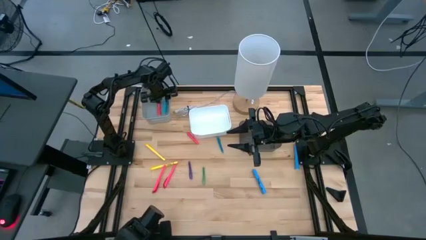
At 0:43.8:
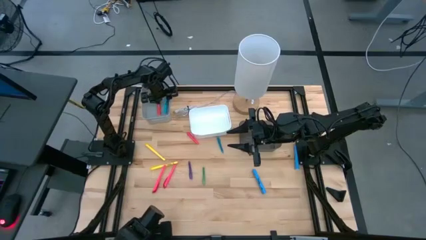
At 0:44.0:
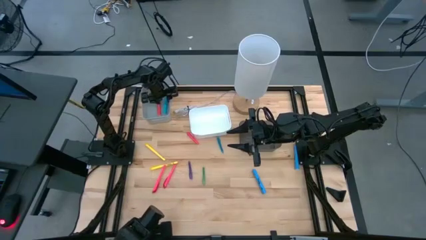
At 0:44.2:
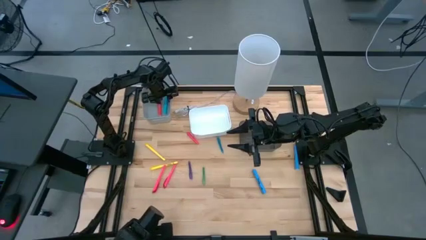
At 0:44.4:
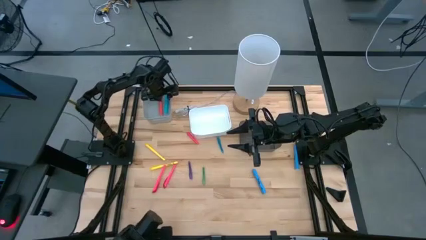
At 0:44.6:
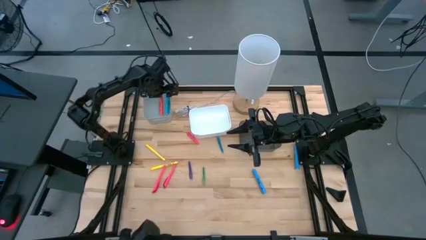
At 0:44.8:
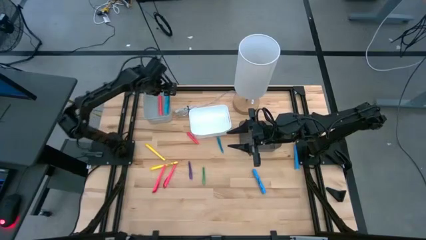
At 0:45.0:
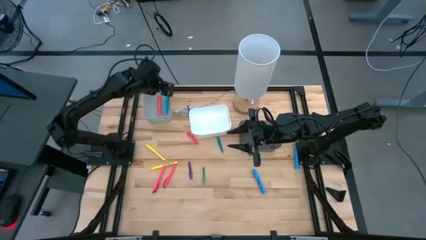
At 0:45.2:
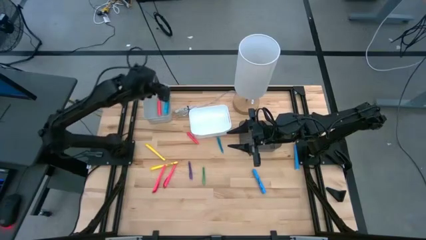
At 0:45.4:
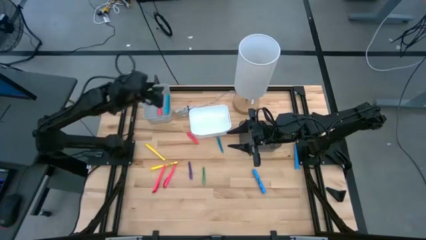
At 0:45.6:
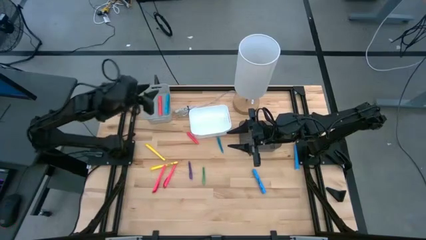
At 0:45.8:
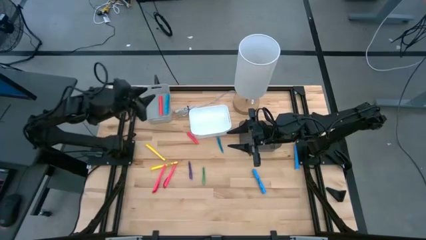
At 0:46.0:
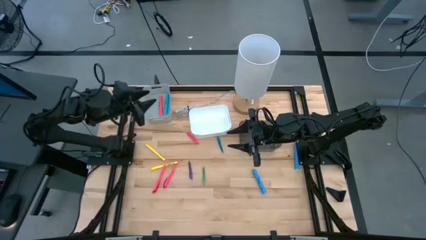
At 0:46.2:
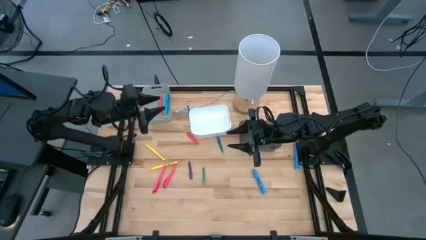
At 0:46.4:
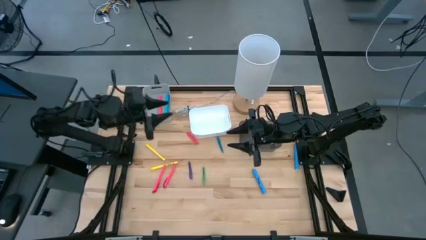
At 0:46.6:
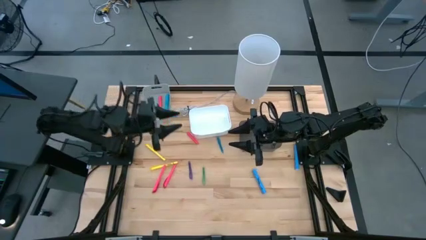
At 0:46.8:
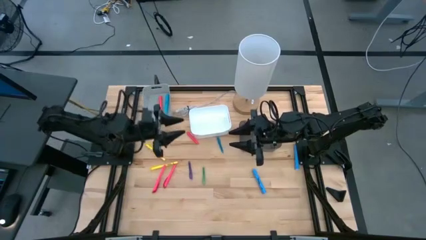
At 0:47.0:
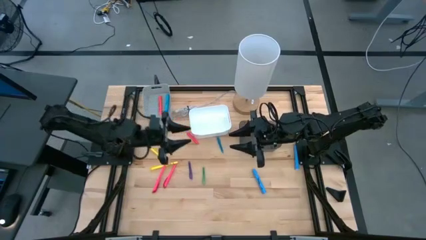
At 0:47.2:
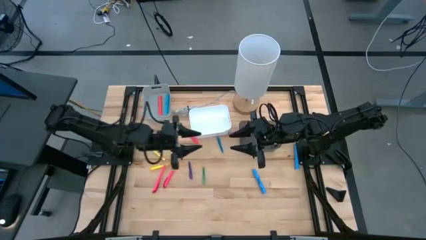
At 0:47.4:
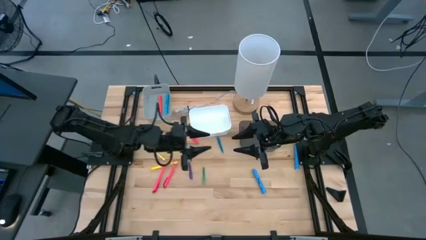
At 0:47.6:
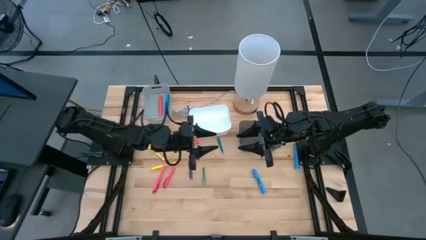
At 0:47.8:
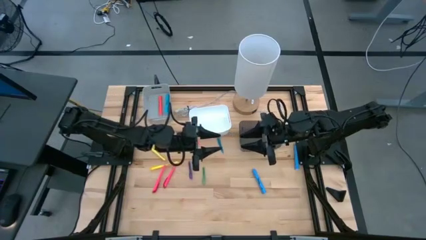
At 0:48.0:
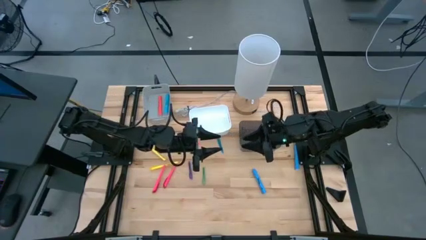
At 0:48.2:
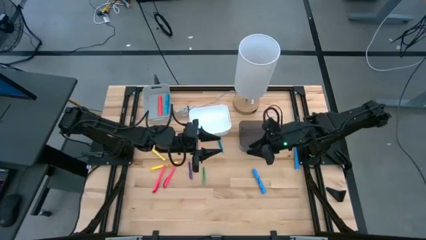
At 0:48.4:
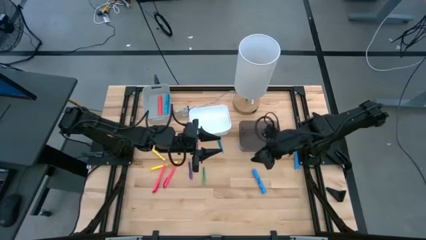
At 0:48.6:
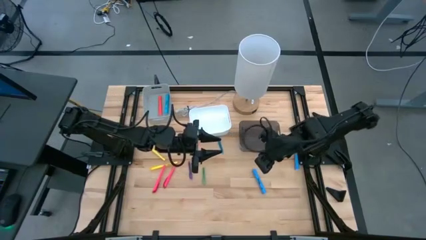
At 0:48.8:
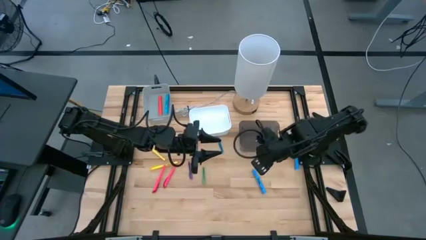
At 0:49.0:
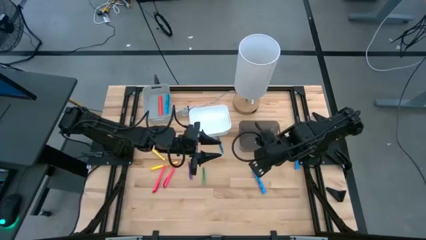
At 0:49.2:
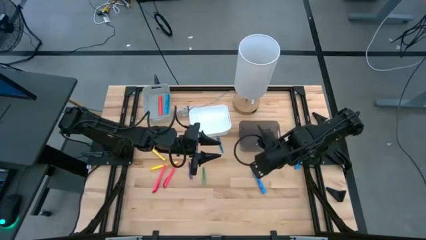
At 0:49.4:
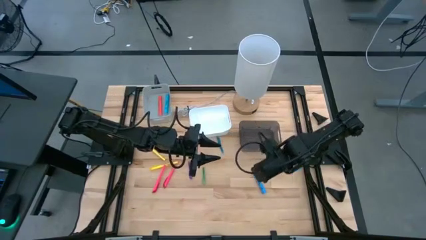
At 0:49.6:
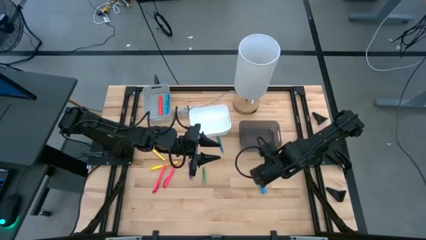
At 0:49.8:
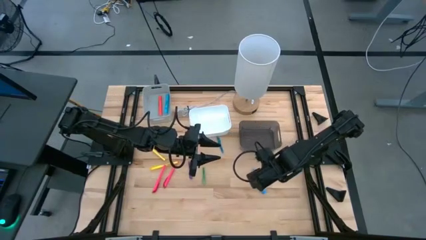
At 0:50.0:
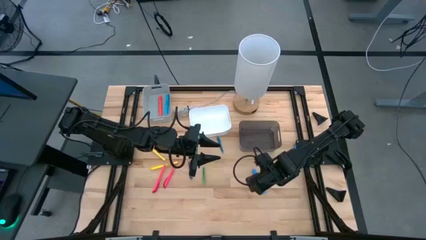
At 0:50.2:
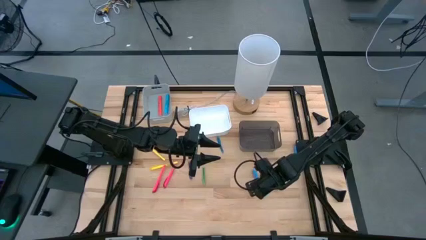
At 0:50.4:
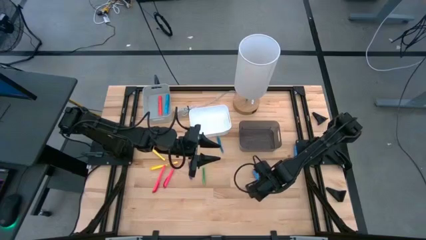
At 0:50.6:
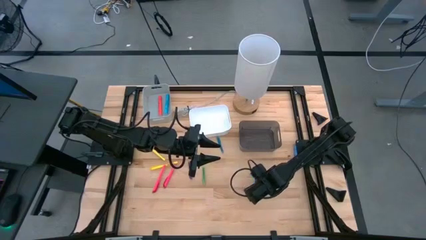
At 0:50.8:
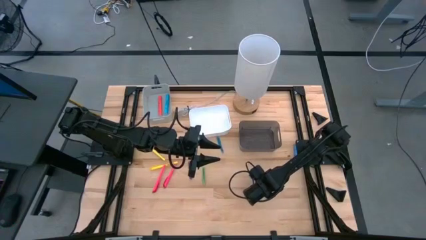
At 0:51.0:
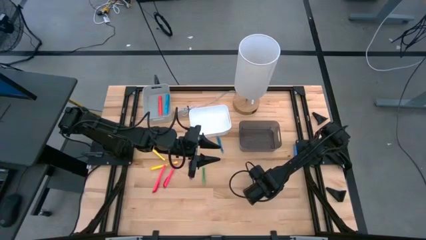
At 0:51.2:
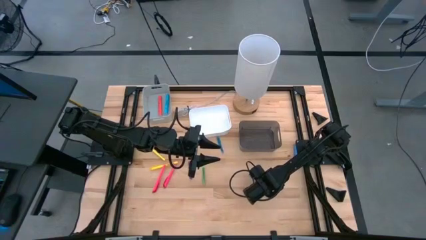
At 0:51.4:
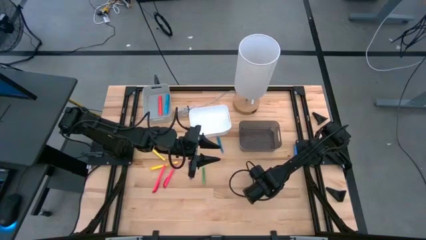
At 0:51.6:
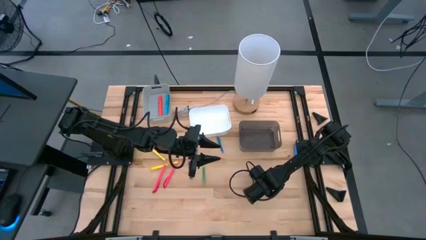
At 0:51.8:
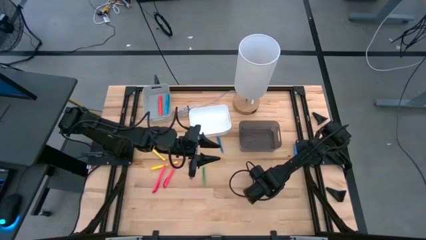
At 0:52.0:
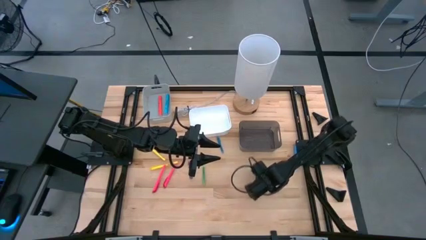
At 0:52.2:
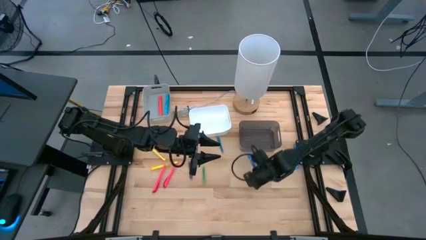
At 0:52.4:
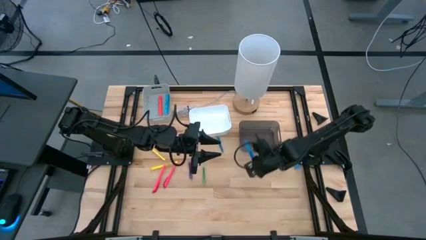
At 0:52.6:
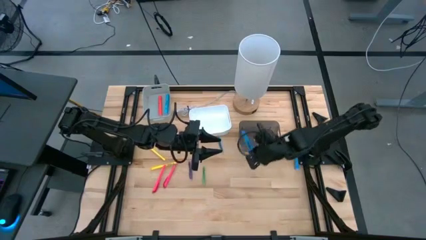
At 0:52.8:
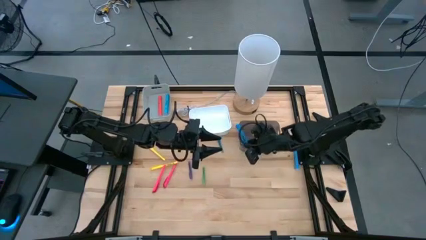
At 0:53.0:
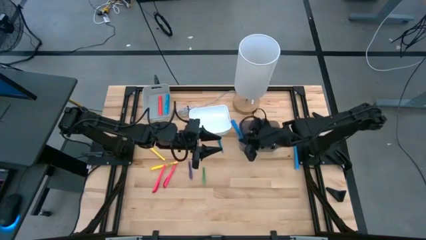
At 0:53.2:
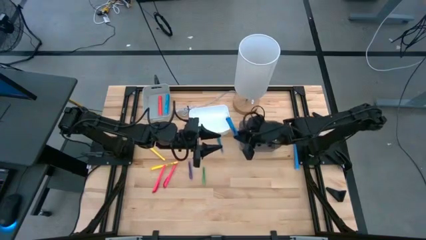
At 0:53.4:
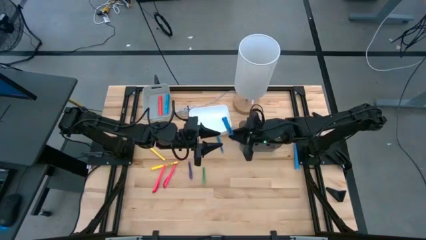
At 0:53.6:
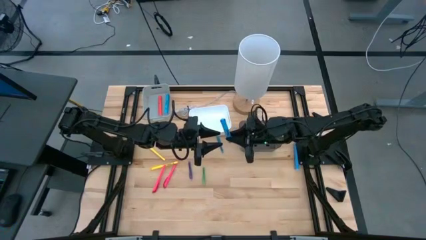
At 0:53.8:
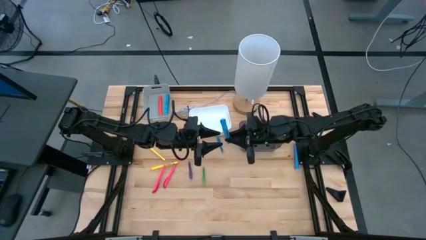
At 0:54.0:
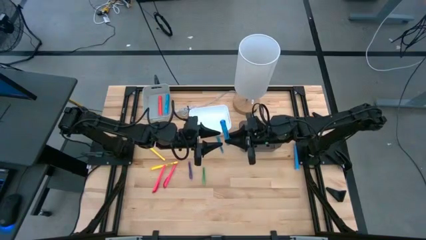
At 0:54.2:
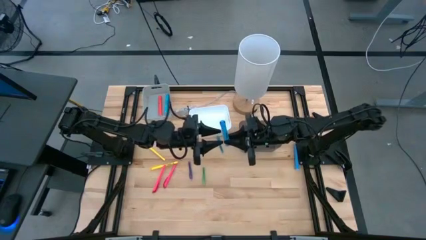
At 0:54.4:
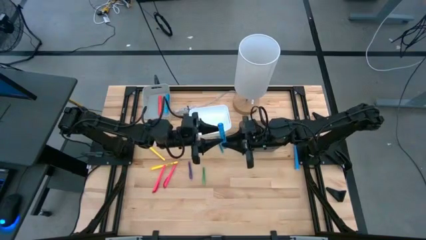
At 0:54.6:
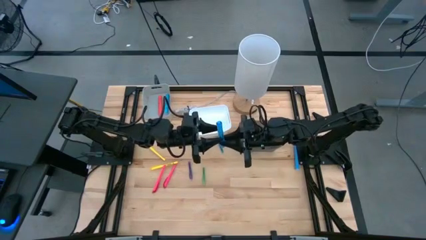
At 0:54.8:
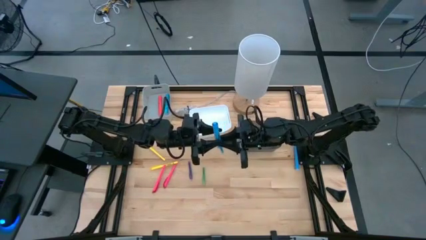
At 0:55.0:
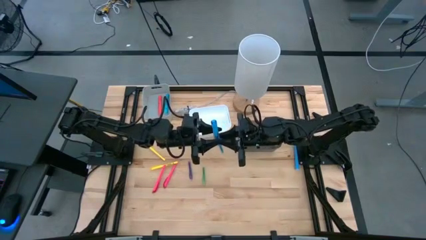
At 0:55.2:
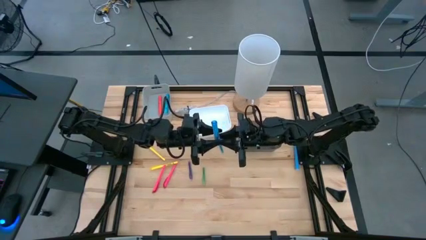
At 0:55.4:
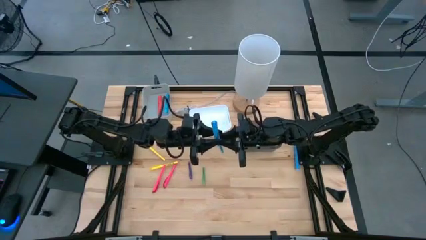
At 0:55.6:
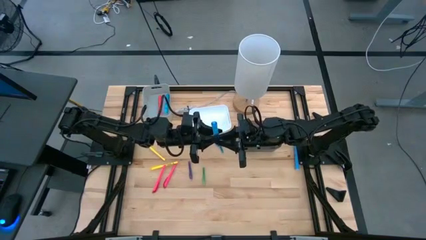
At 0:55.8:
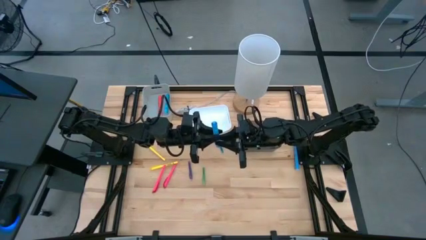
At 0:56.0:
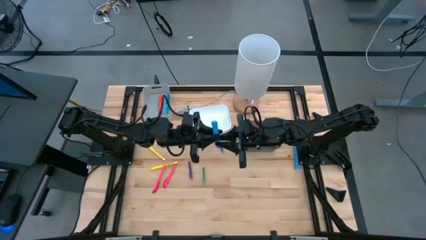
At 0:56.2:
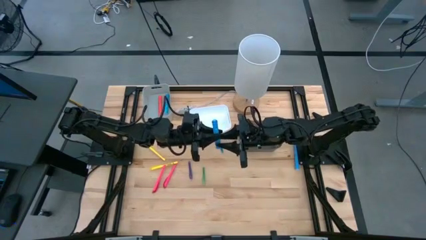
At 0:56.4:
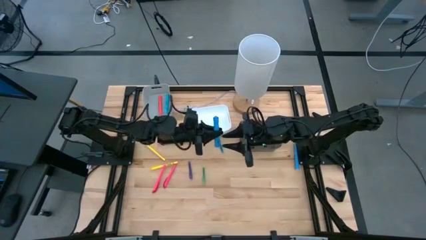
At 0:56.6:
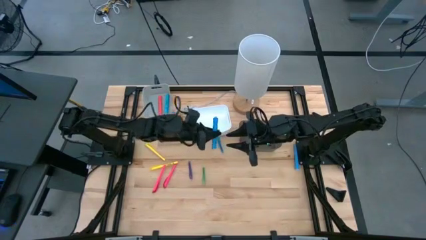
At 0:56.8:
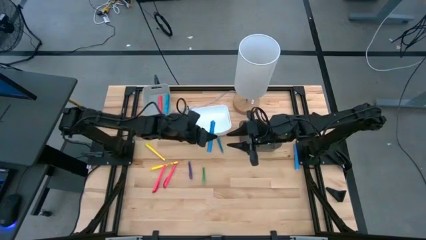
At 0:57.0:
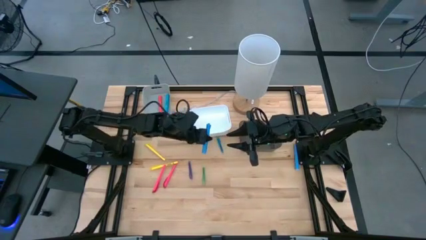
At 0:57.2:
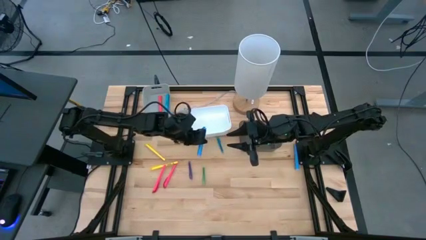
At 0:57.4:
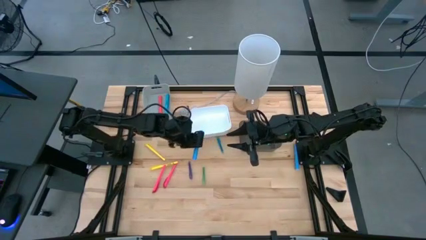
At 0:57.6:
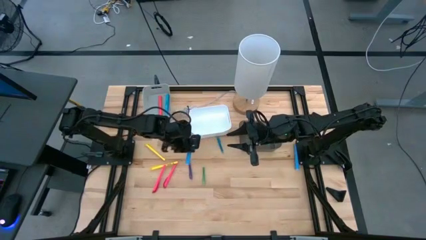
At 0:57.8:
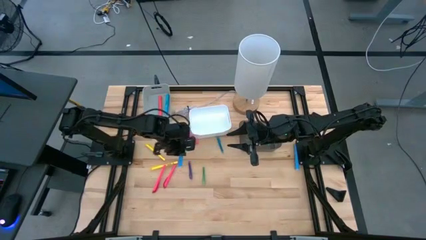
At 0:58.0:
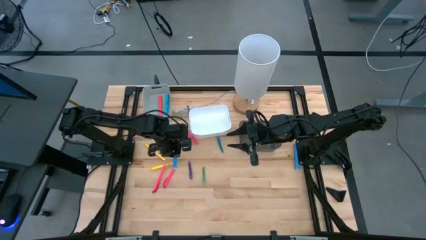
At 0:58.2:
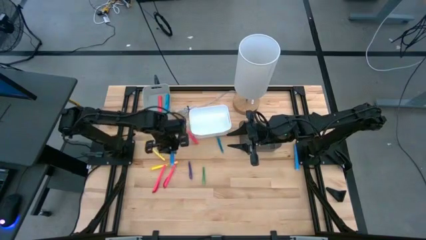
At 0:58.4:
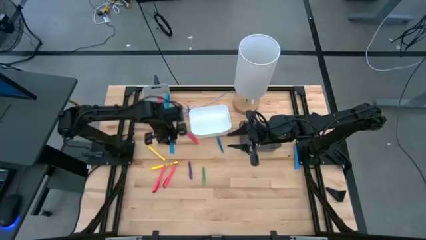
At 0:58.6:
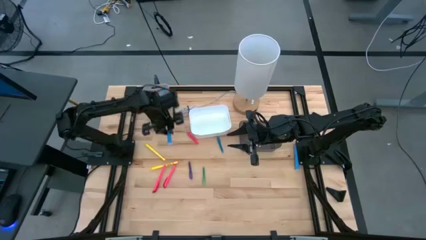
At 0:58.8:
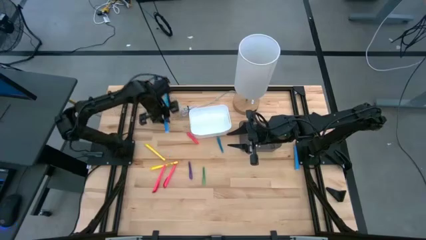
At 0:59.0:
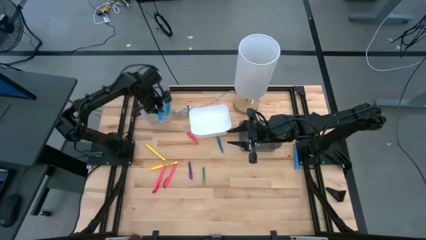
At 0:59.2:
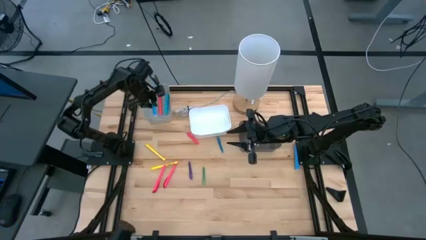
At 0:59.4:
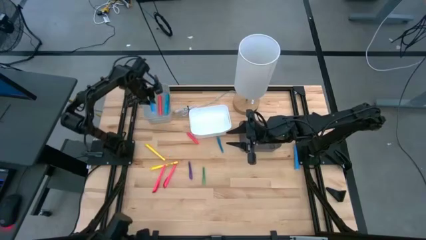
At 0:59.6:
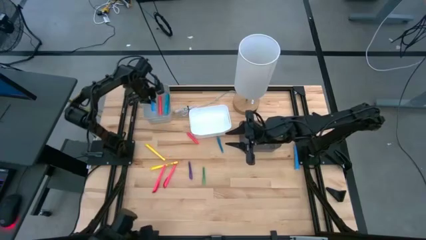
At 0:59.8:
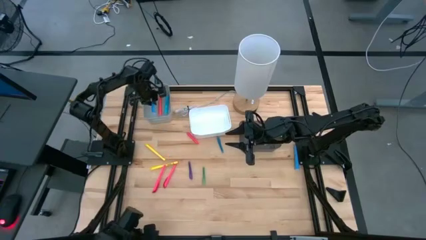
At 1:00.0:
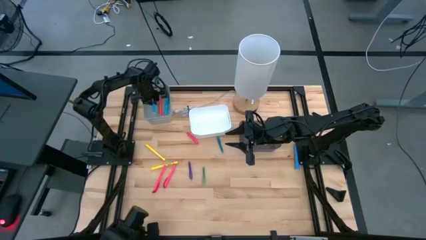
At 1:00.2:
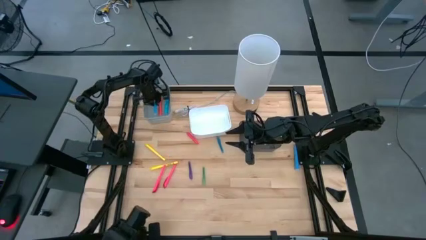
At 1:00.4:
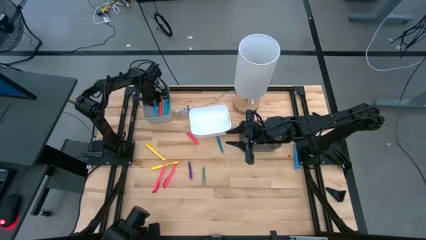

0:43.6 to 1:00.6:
Task: Pick & Place Markers
Put the left blue highlighter pen into the gray bin
